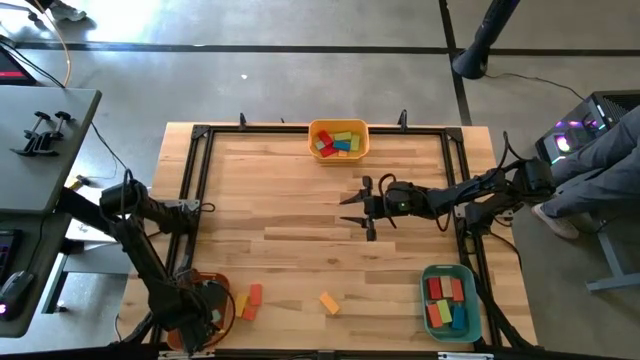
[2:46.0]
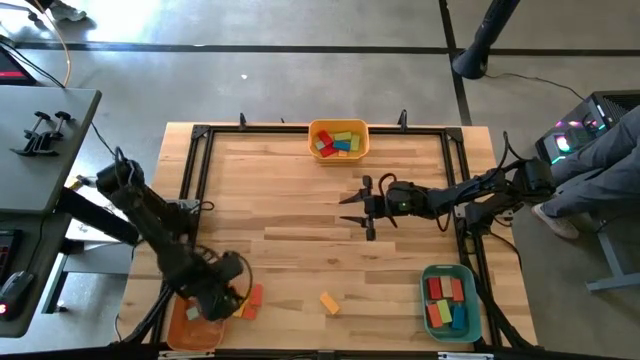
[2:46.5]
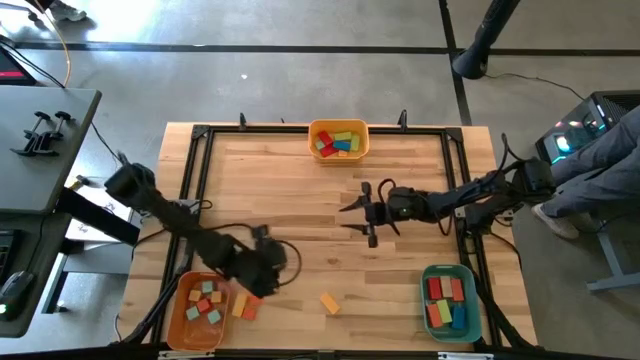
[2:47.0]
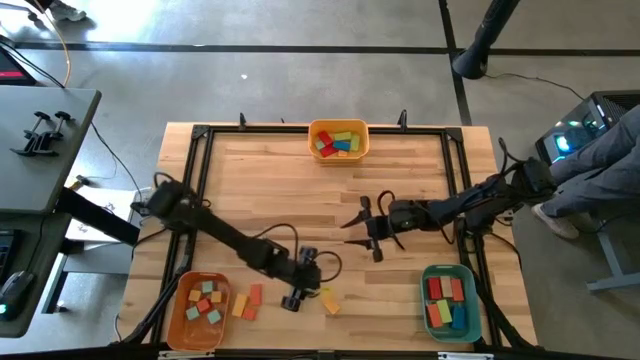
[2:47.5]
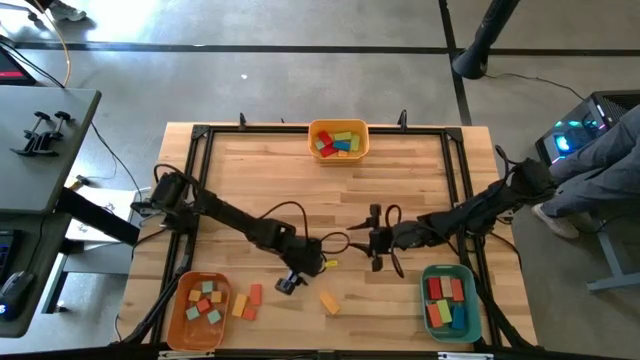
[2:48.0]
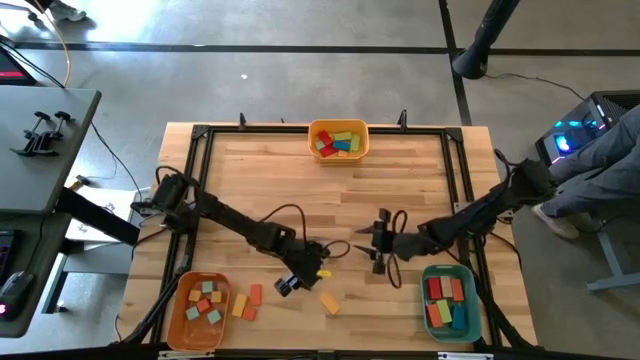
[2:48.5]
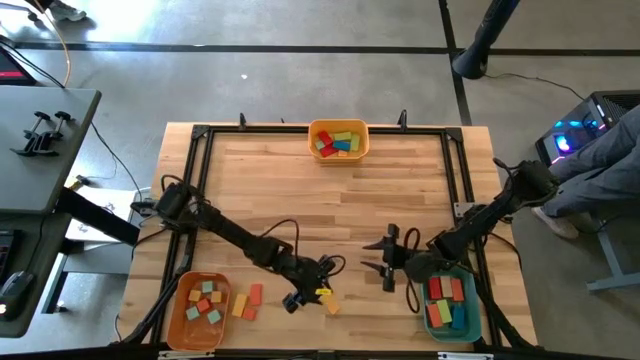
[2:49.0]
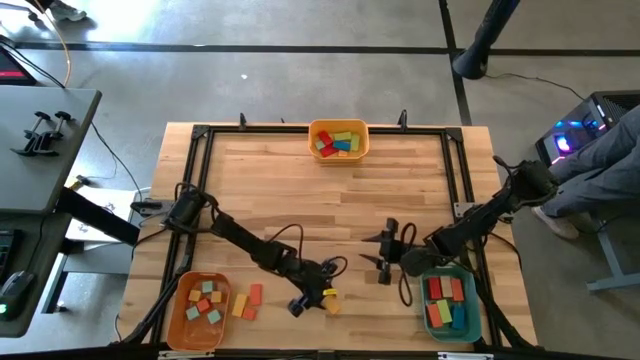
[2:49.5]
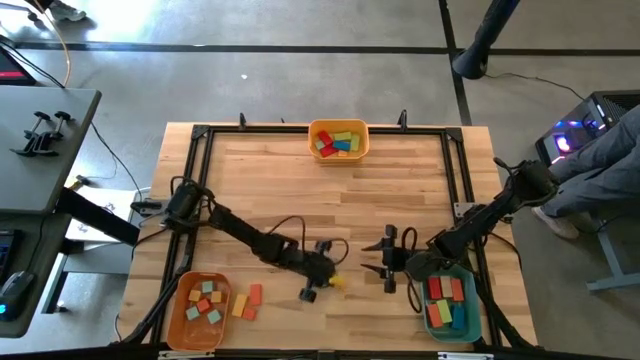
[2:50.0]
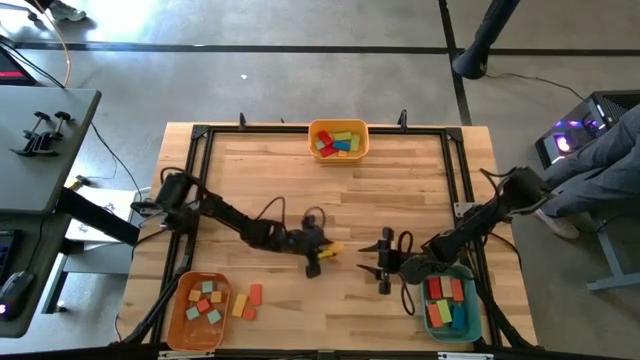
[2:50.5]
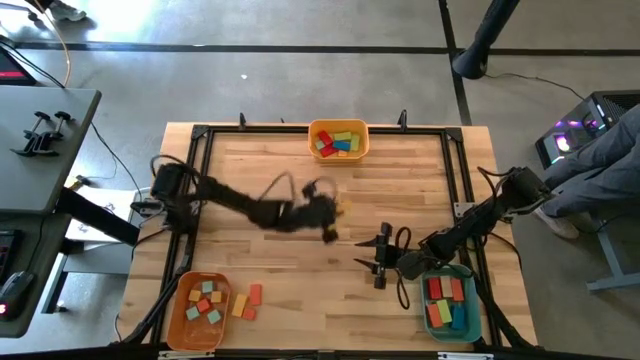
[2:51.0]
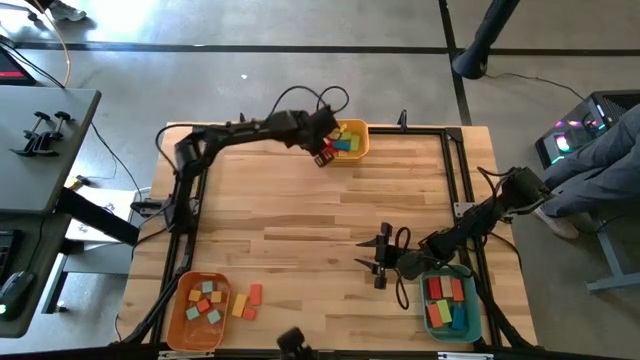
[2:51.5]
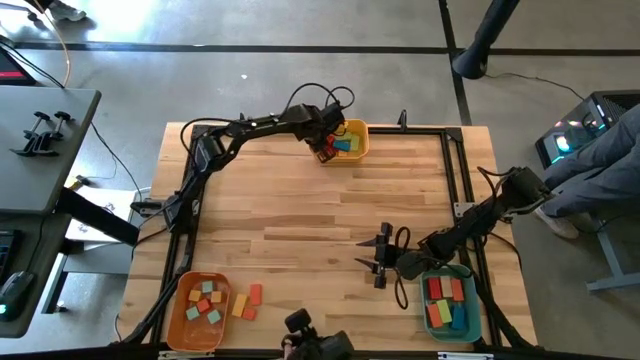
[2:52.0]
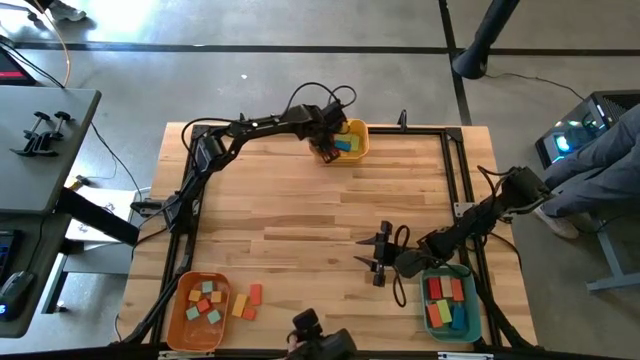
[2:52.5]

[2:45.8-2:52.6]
Task: Sort blocks by size
Put the small yellow rectangle block into the yellow bin

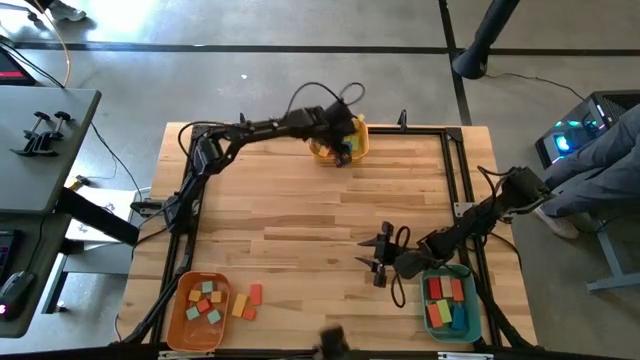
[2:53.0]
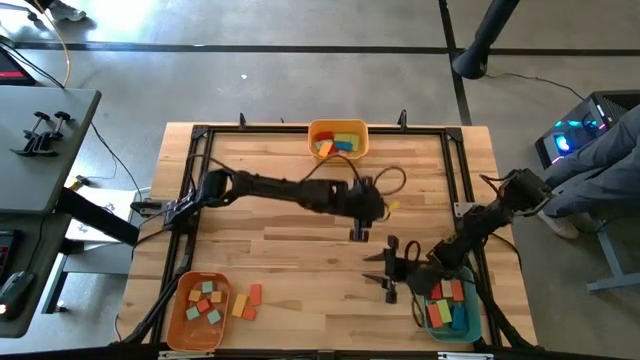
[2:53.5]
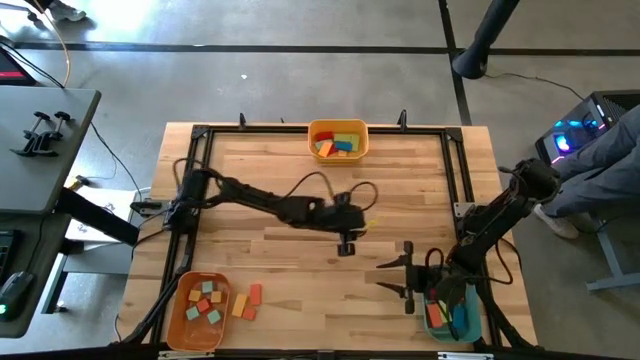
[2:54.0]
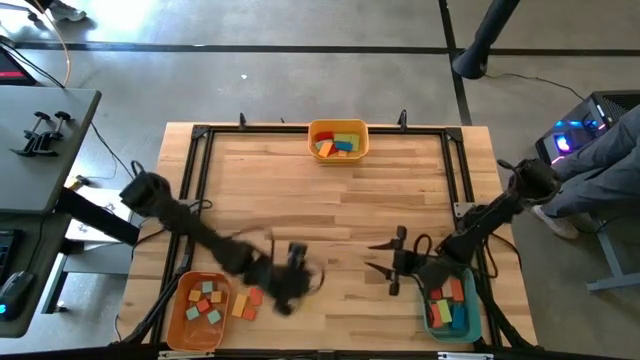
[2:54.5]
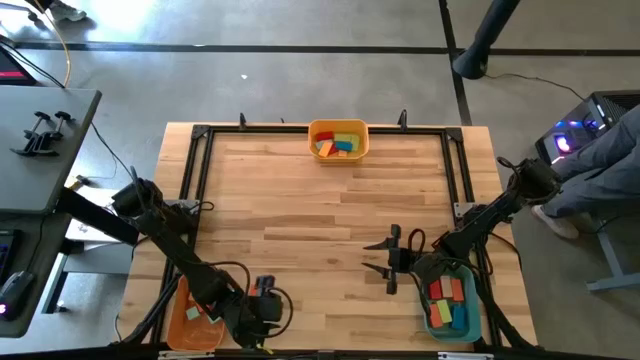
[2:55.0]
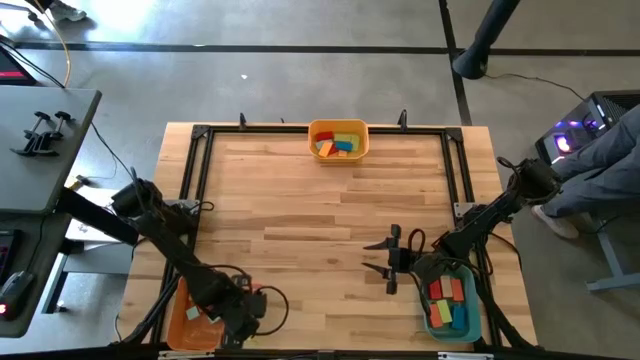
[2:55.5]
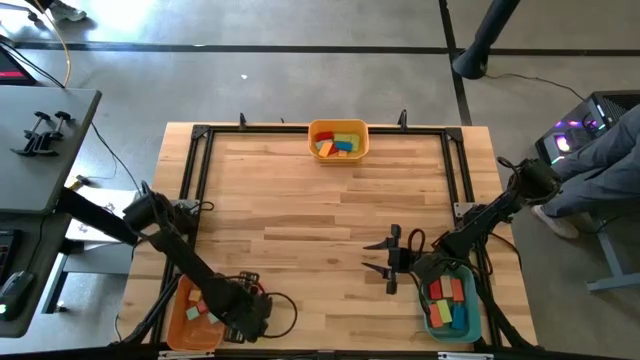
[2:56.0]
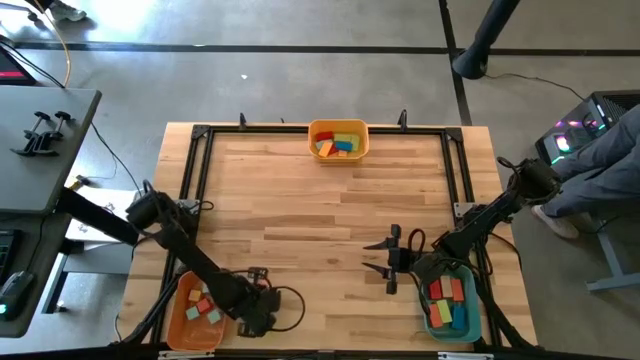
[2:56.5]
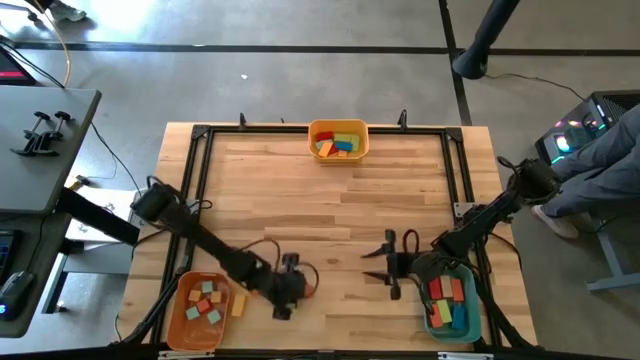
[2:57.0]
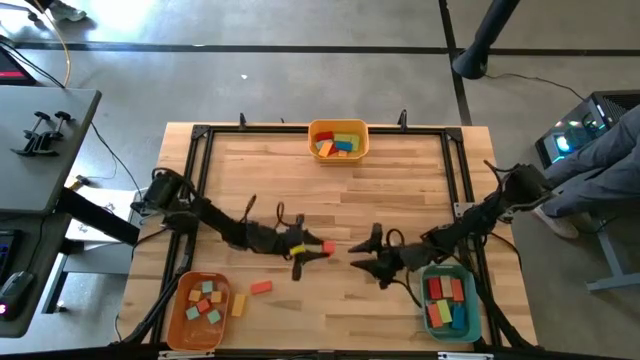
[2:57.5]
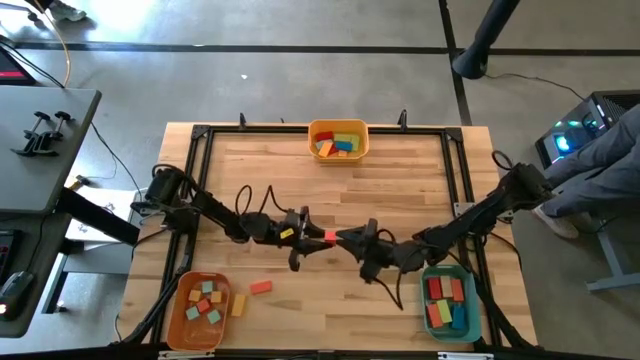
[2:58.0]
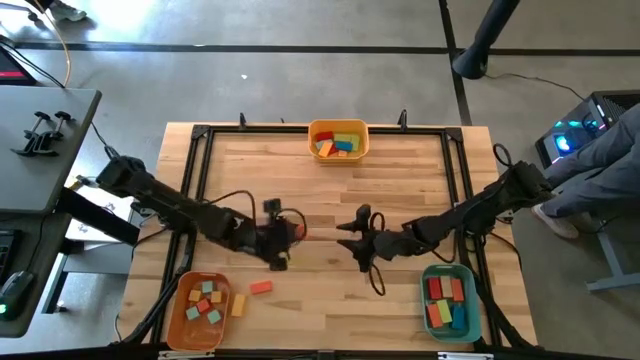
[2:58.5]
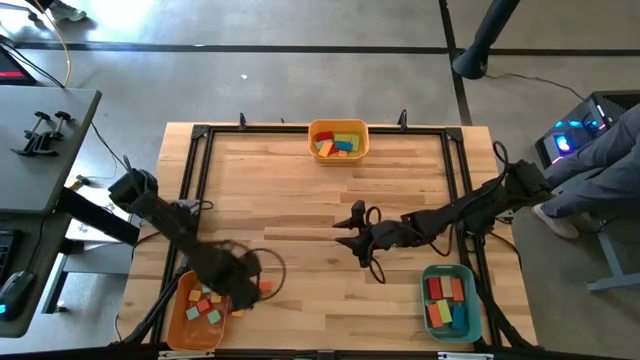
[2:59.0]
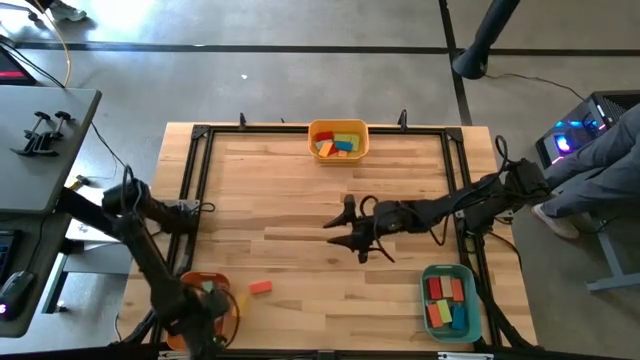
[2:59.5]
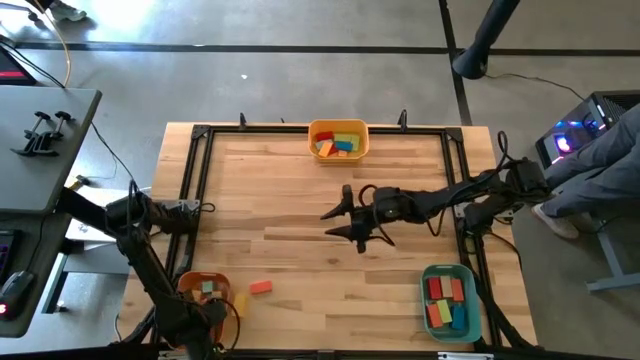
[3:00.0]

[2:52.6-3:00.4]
Put the orange square block into the orange bin

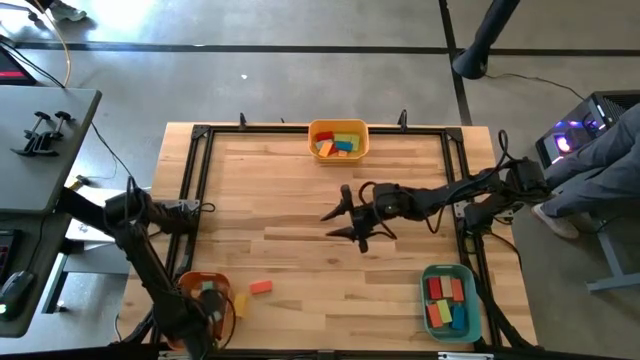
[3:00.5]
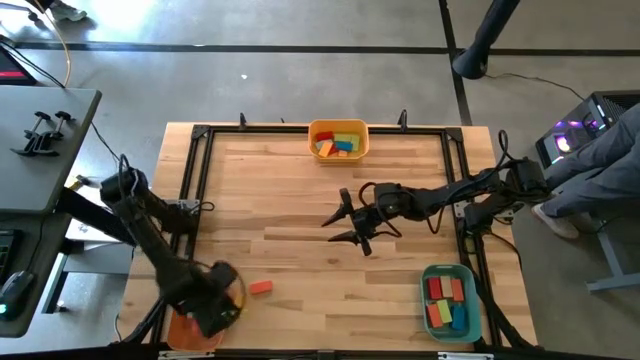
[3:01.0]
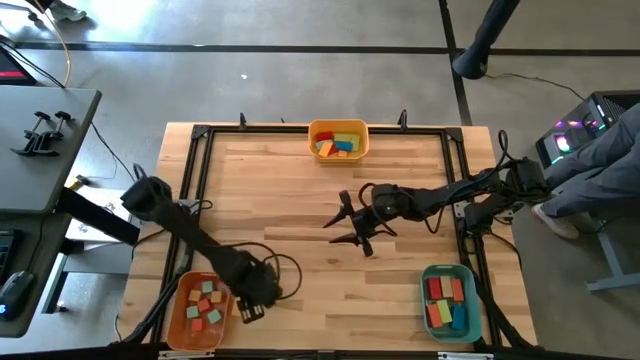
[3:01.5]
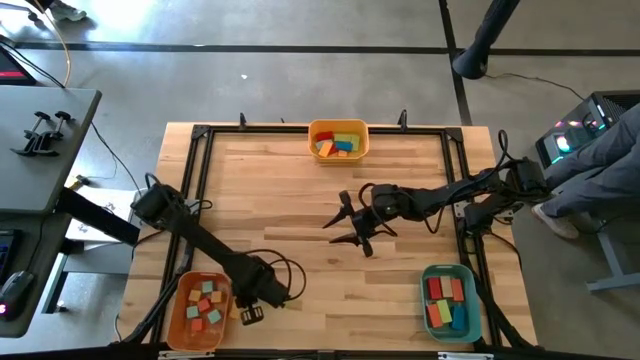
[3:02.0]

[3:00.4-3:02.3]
Put the large yellow rectangle block into the green bin

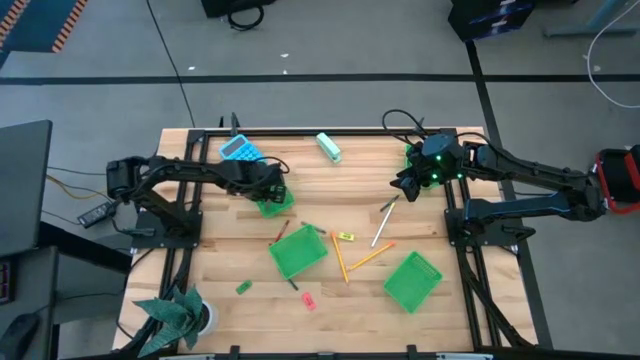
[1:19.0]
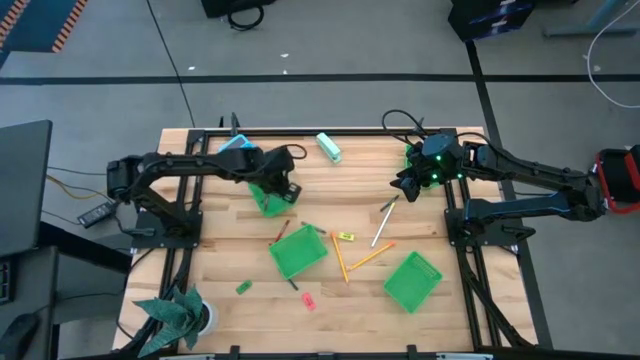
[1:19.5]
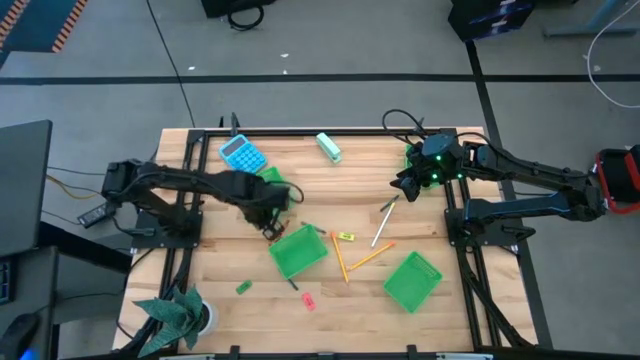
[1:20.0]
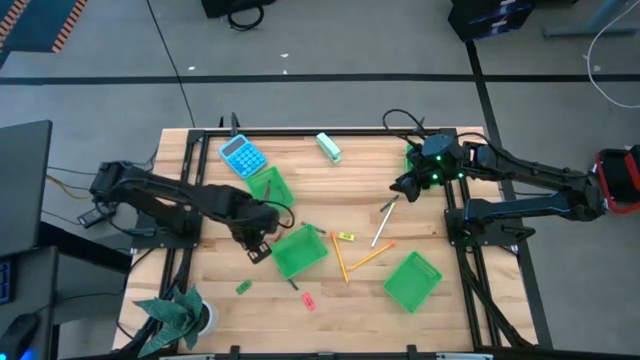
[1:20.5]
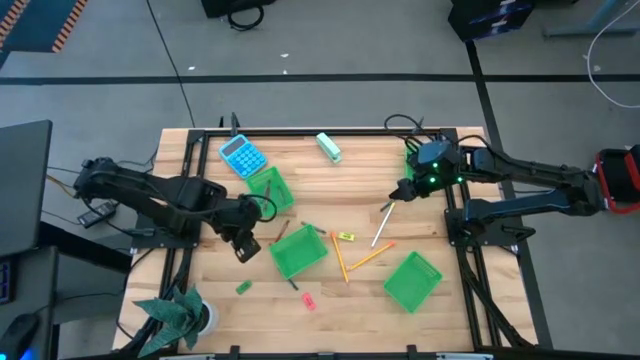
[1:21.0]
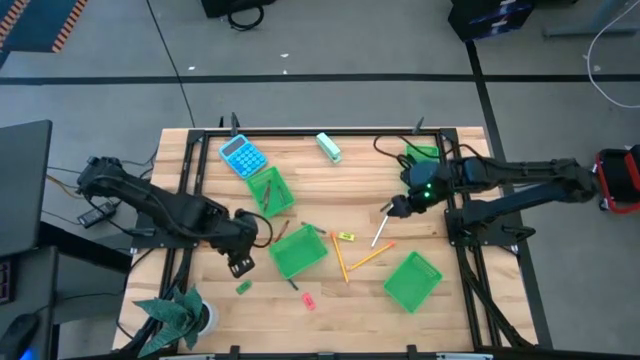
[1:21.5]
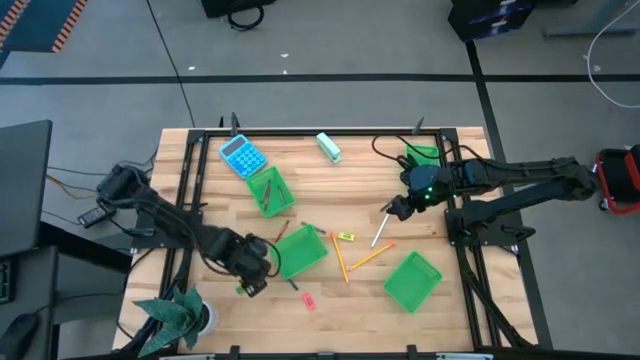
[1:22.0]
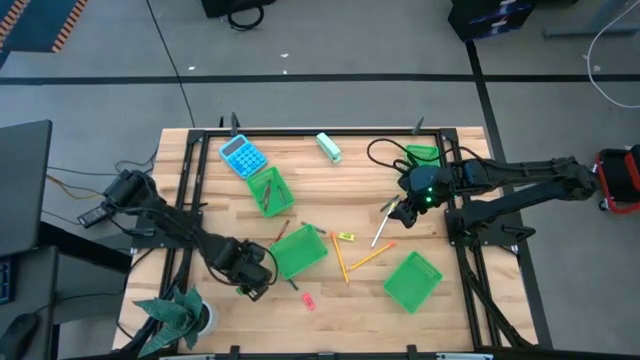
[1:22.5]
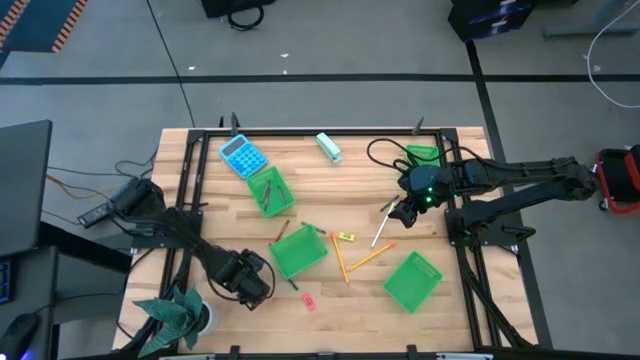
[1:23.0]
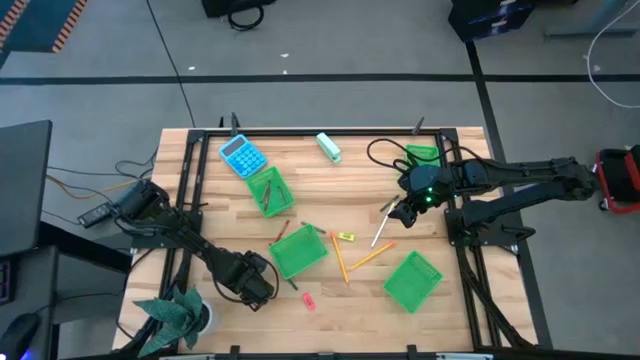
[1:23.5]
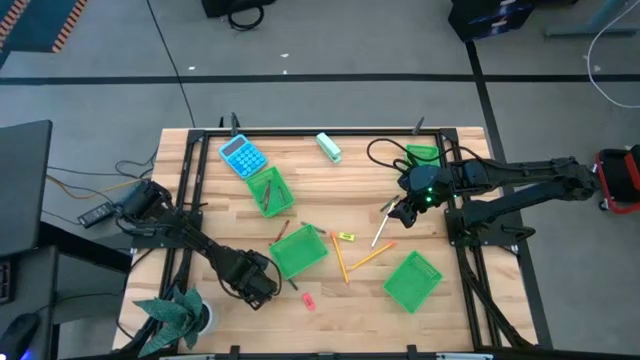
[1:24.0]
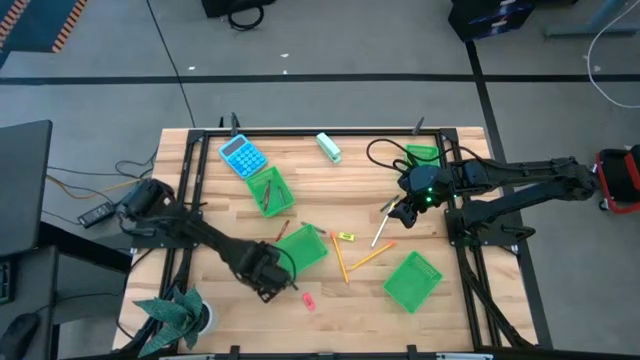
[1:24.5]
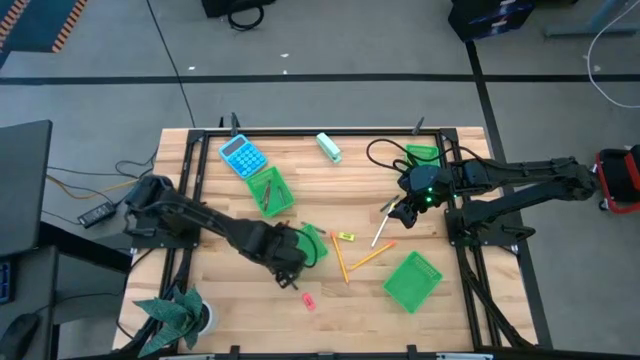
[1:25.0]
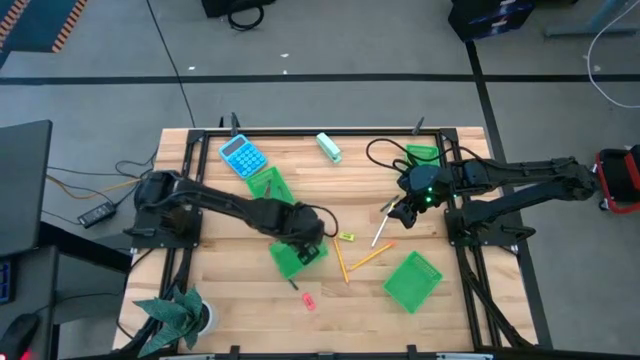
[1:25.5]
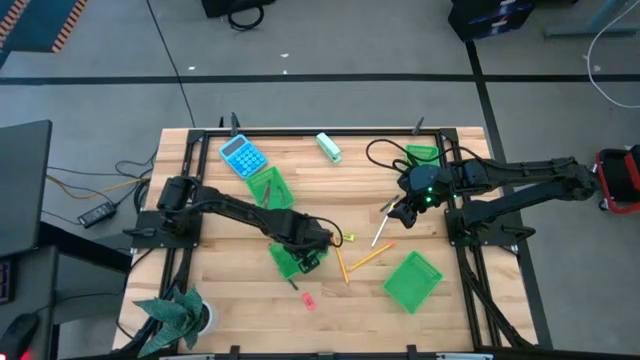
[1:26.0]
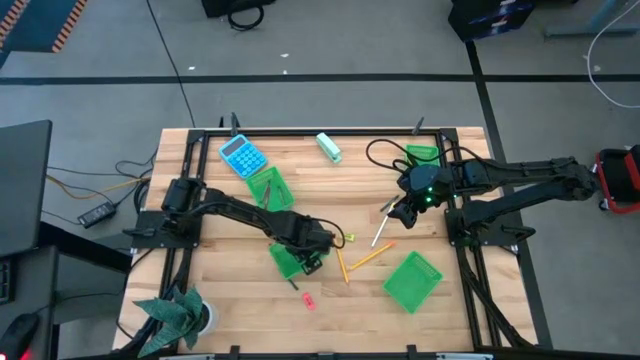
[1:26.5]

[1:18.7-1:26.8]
Task: Sort crayons/erasers/pens/pencils in bins
Put the green eraser into the bottom left green bin
